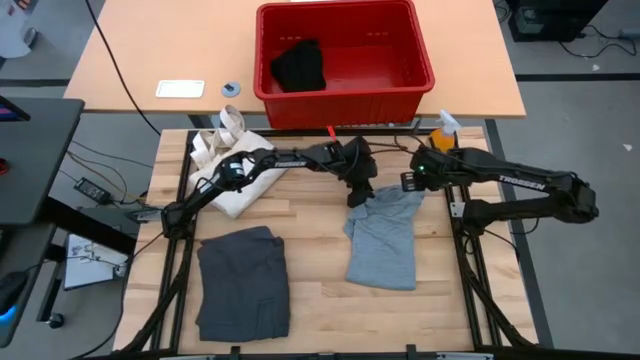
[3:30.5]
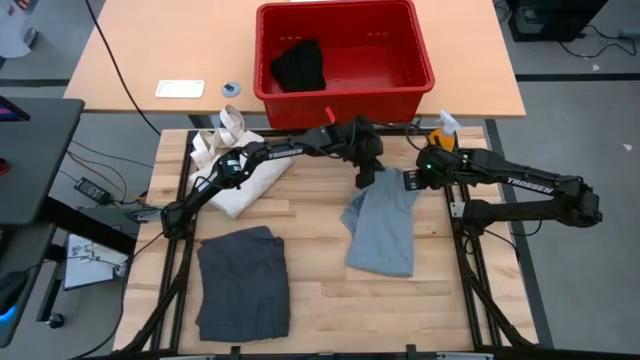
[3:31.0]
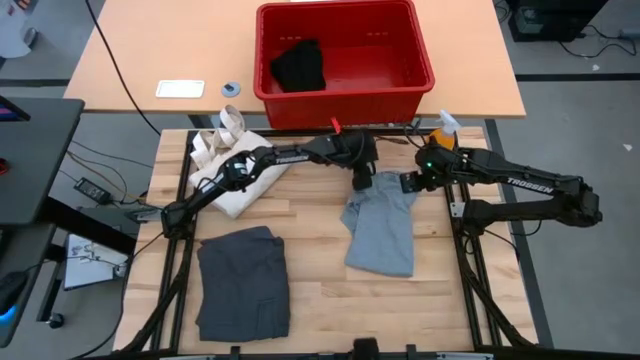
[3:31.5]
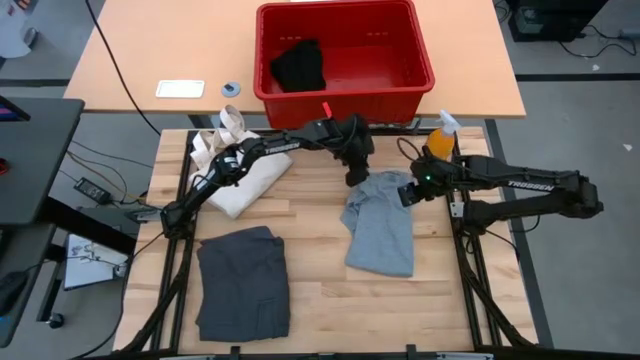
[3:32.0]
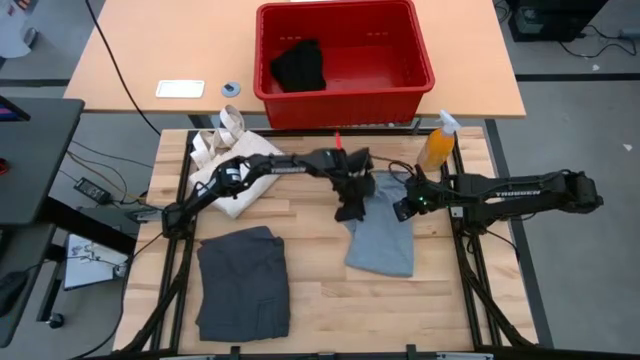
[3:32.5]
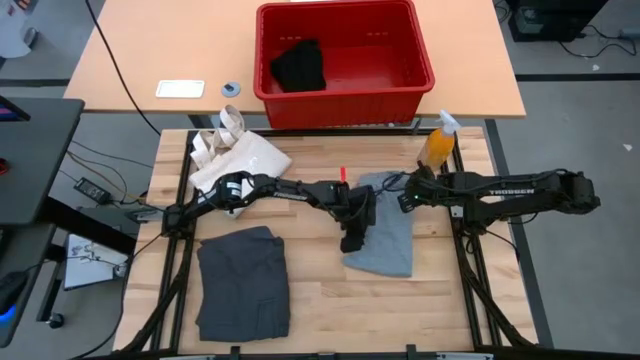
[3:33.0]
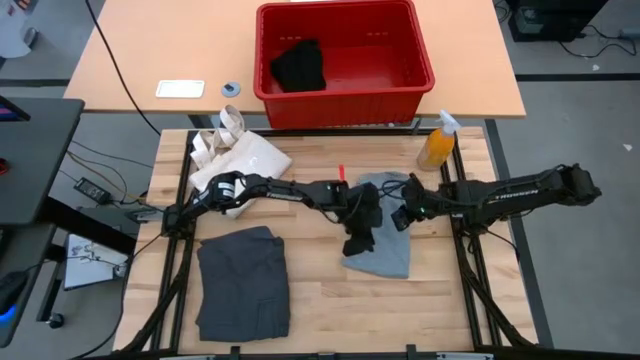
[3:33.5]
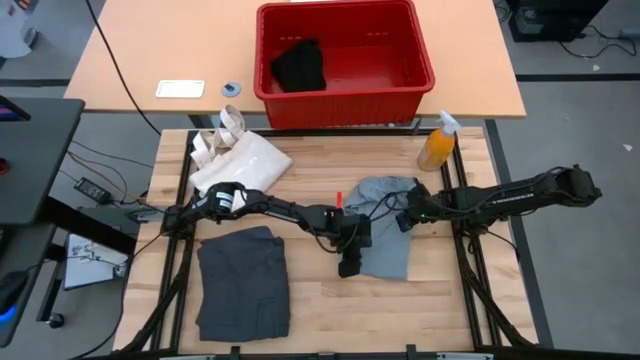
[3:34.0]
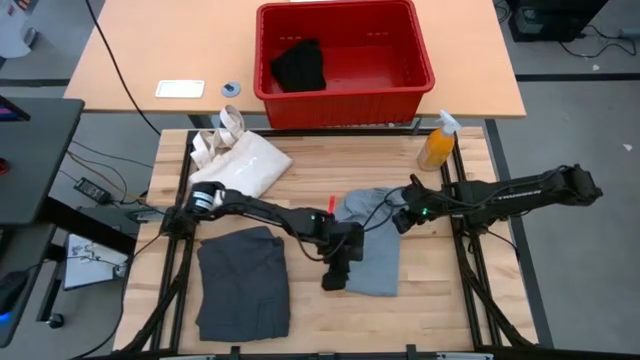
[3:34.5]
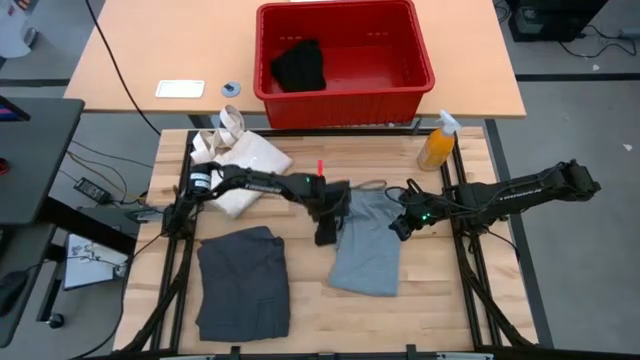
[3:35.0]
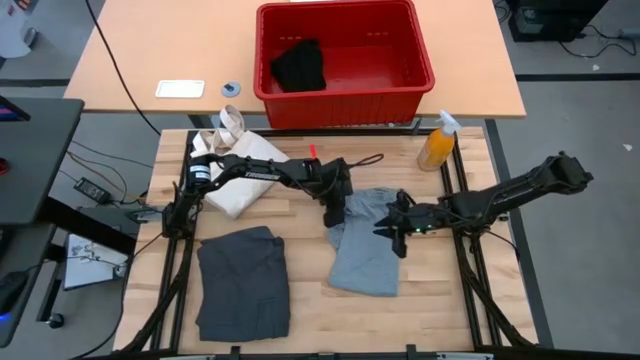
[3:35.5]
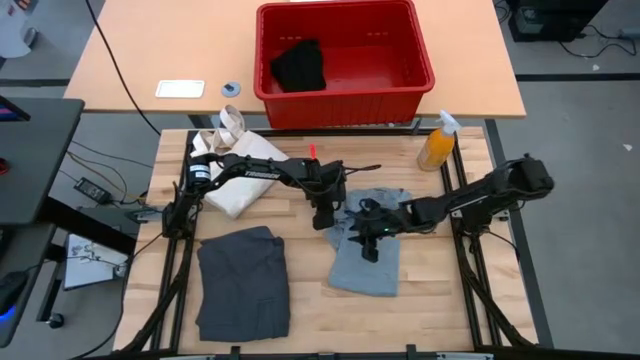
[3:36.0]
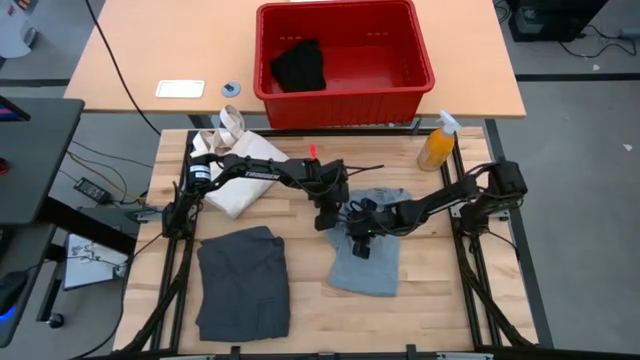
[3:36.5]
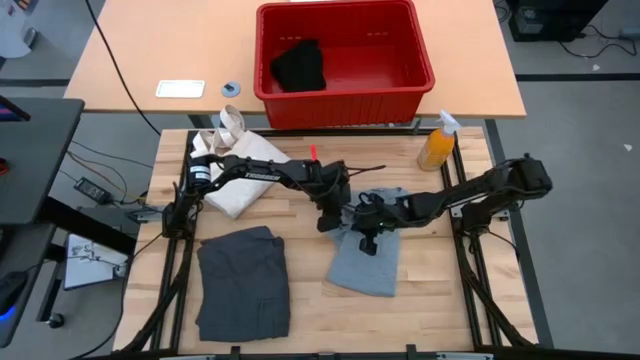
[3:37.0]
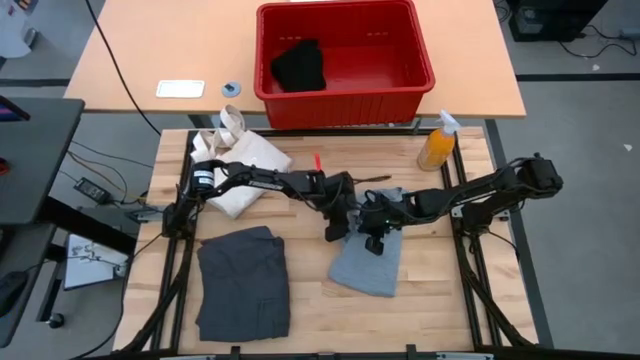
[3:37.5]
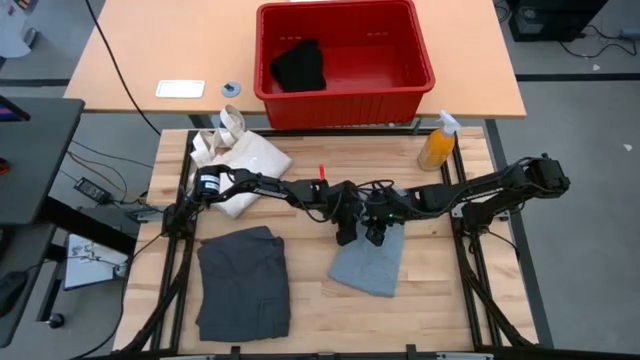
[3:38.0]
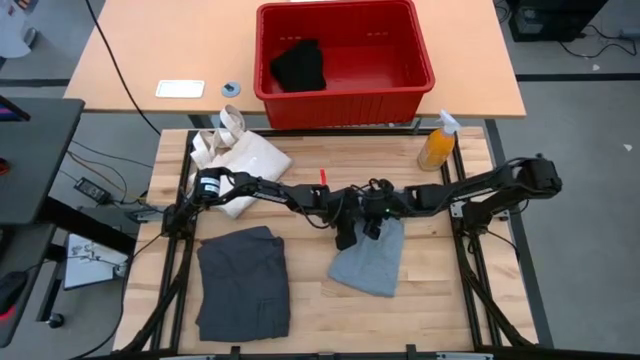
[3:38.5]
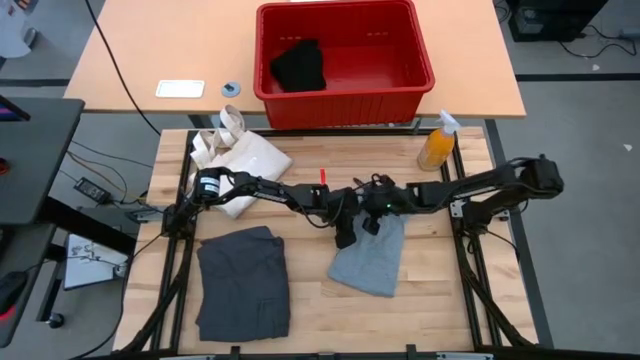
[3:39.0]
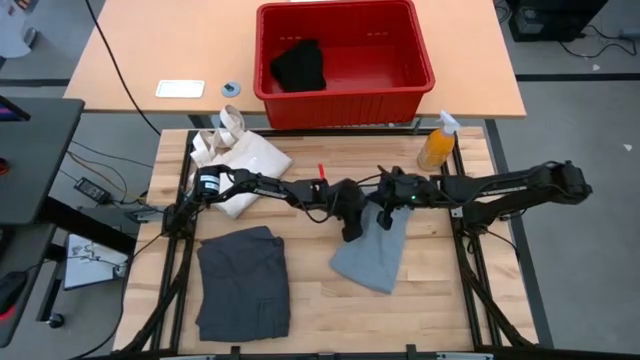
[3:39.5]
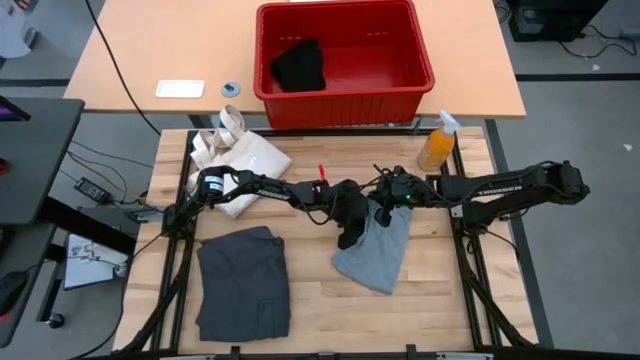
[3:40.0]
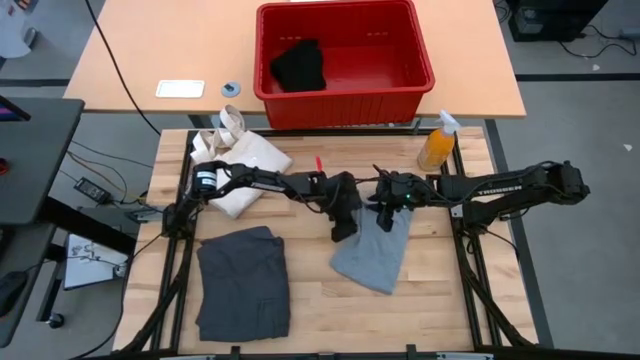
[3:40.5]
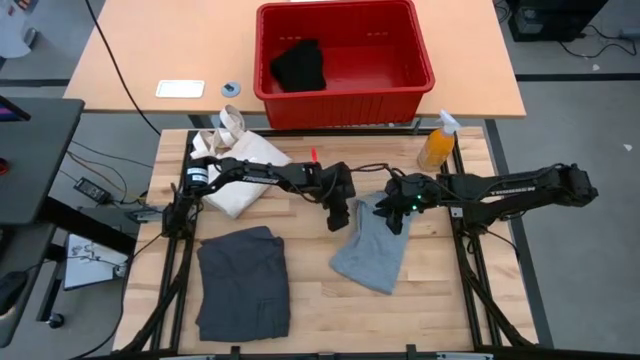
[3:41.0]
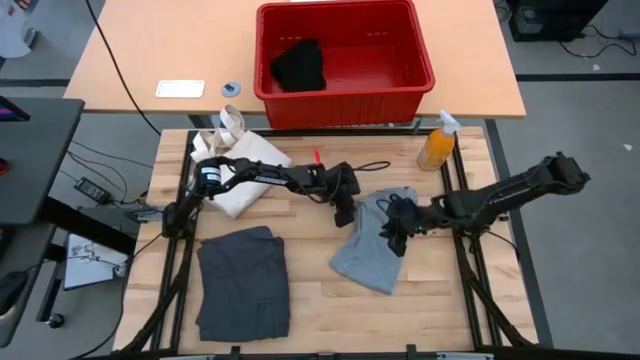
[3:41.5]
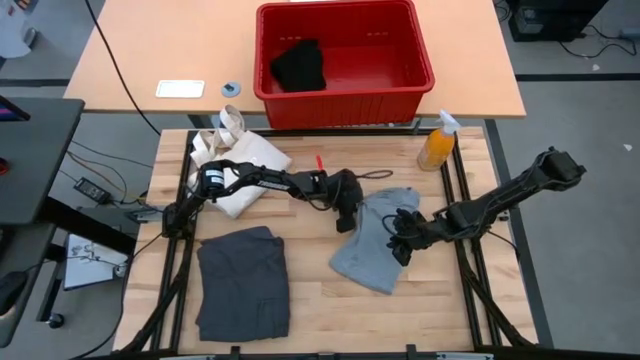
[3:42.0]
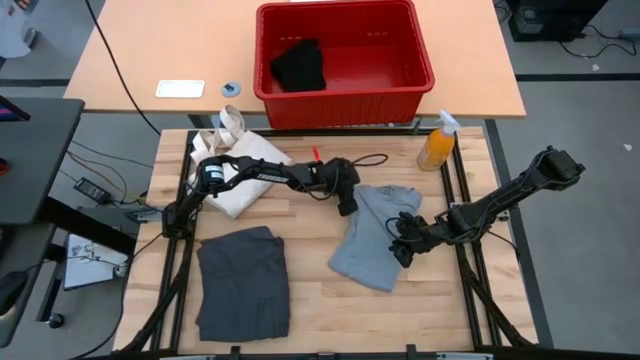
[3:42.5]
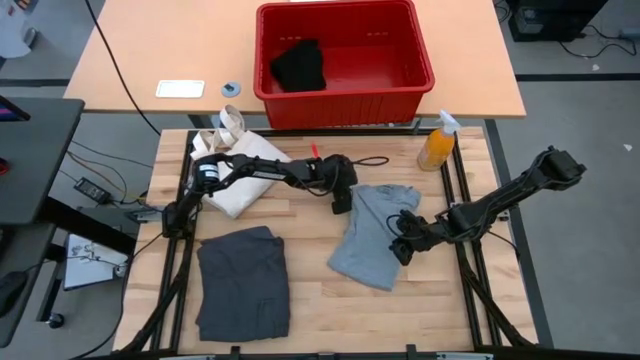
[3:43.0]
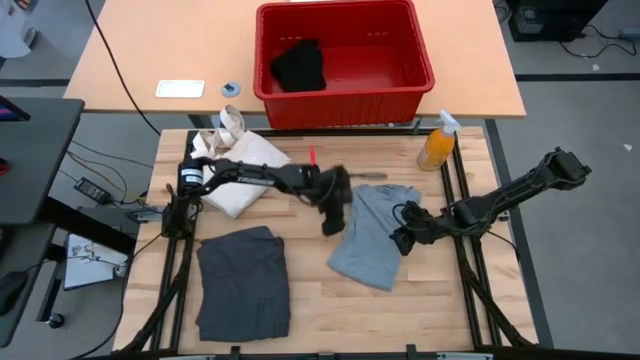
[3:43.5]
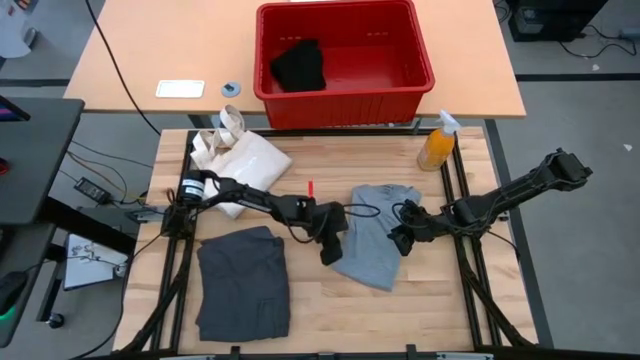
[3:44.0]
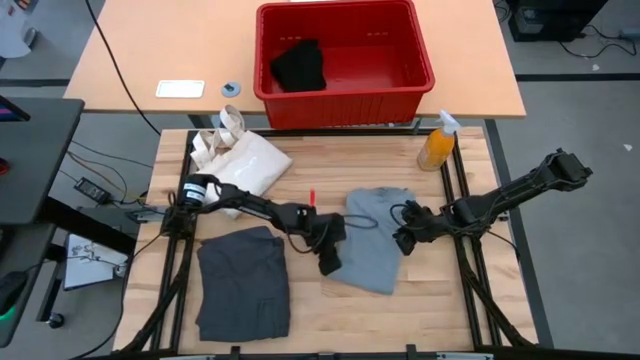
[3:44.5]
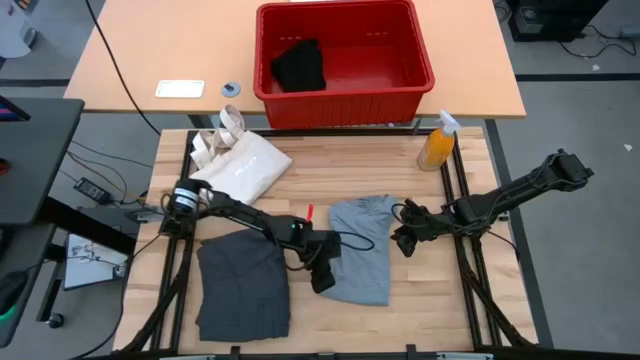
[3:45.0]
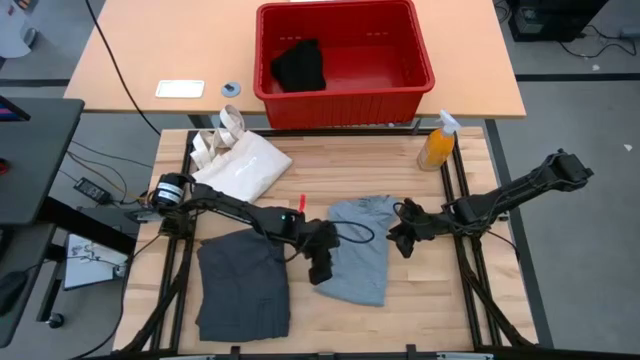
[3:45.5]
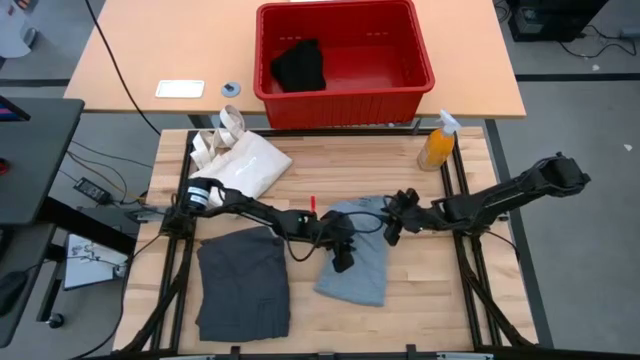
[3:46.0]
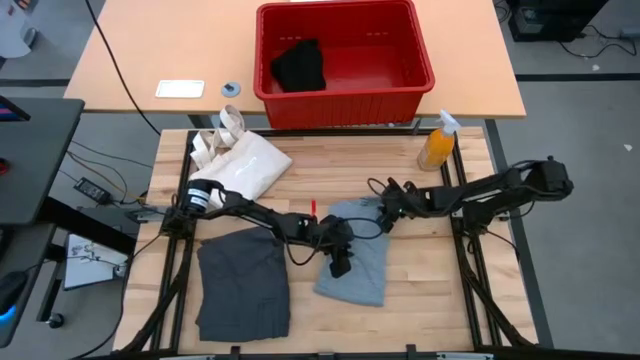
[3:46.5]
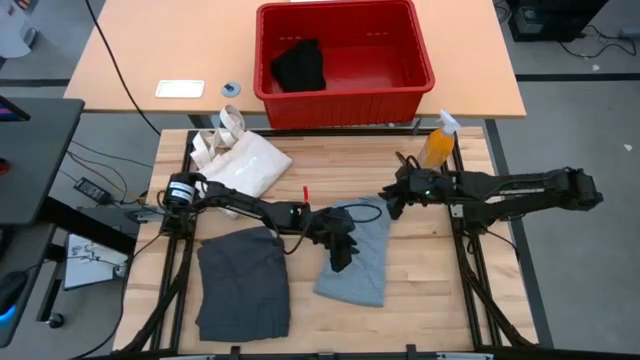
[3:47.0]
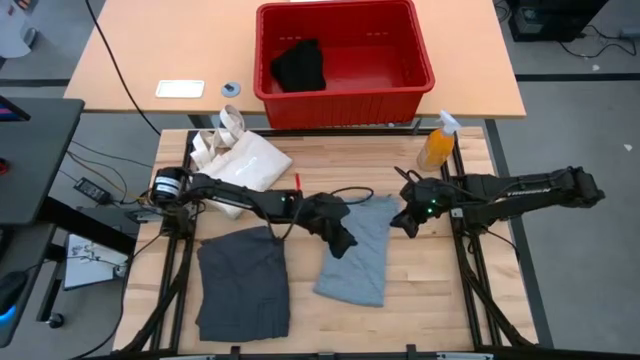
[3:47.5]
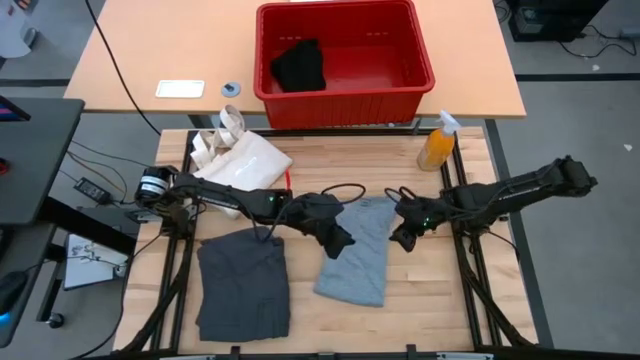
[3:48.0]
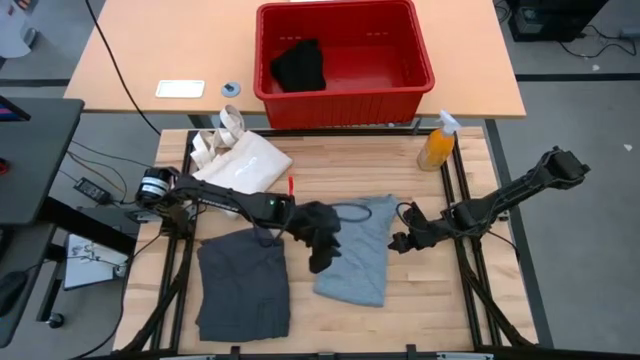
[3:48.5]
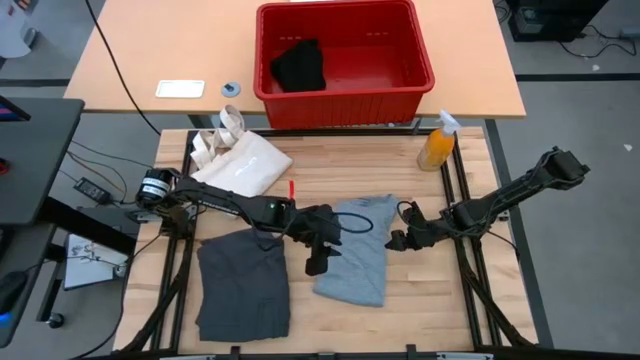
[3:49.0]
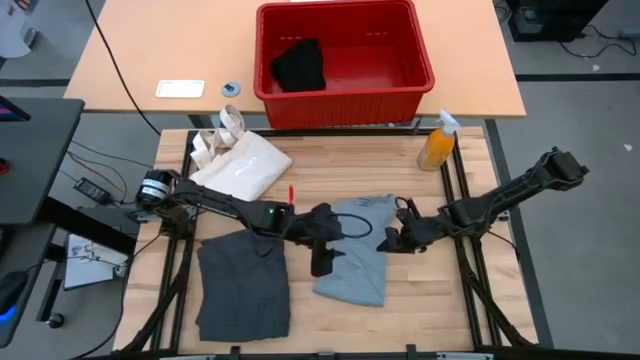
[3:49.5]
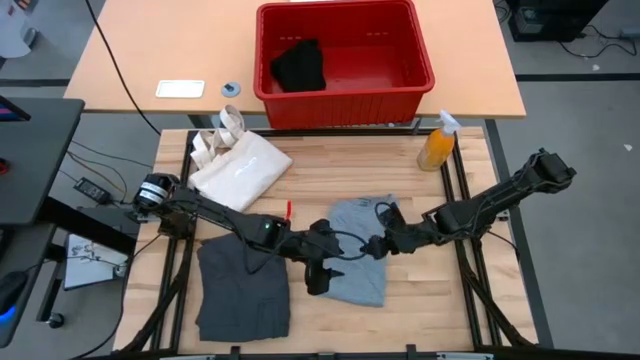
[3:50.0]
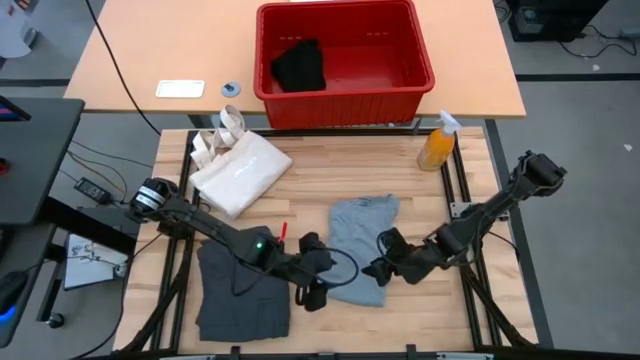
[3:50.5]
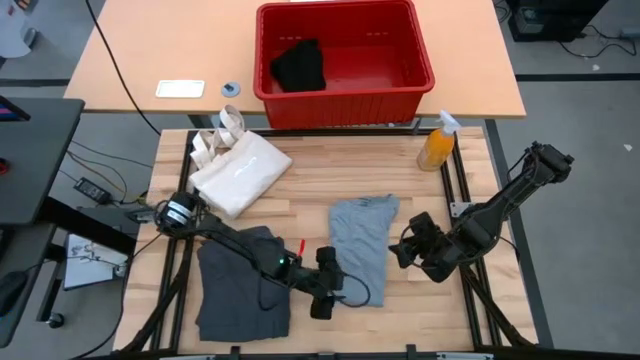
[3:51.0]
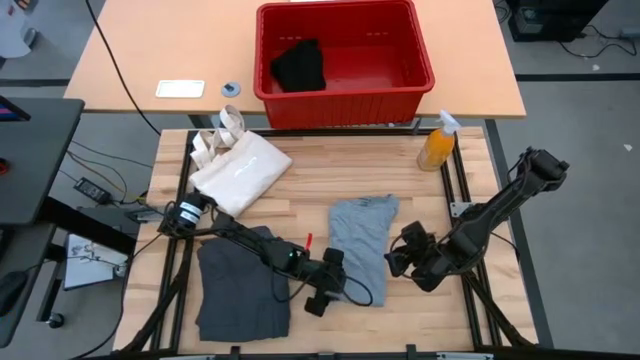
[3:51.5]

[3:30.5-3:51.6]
Task: Fold Laundry from Bin
Fold the light gray t-shirt
